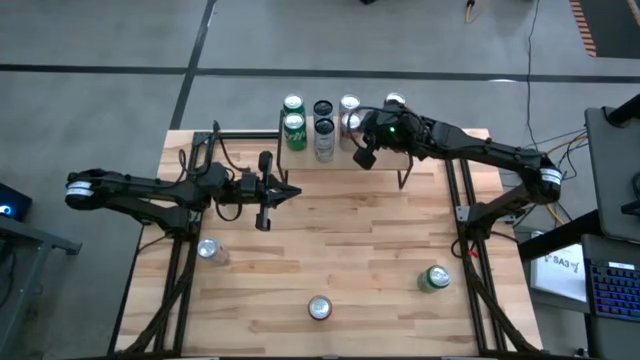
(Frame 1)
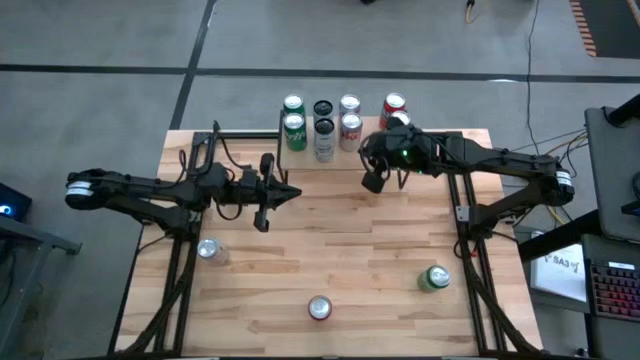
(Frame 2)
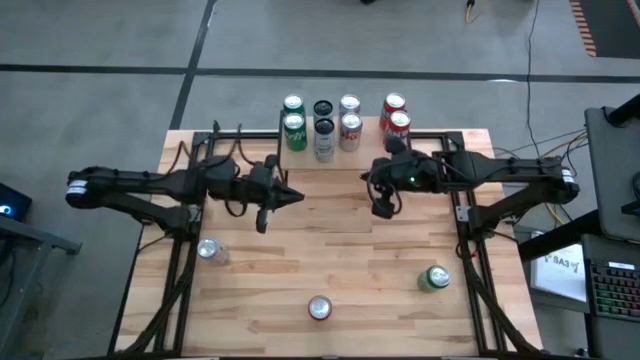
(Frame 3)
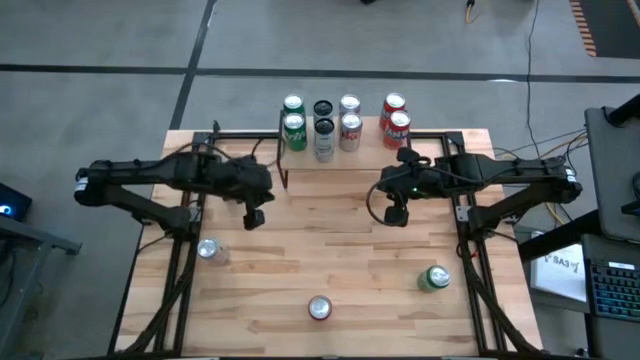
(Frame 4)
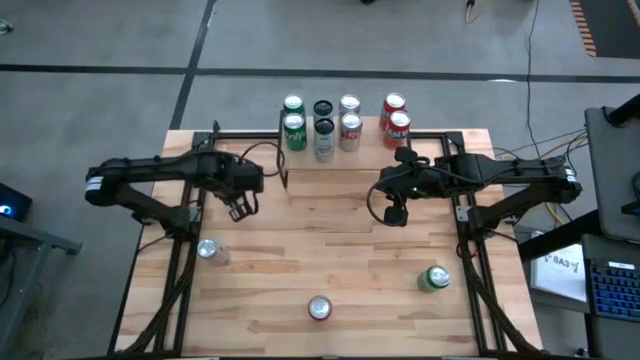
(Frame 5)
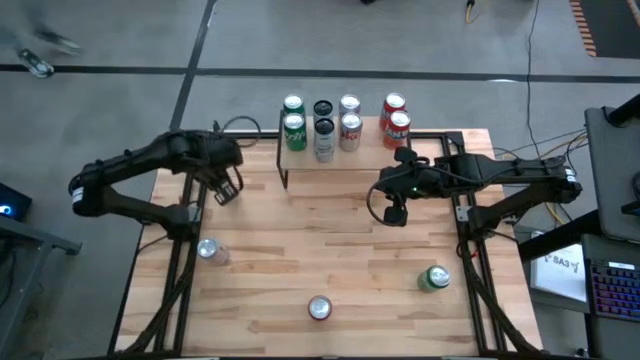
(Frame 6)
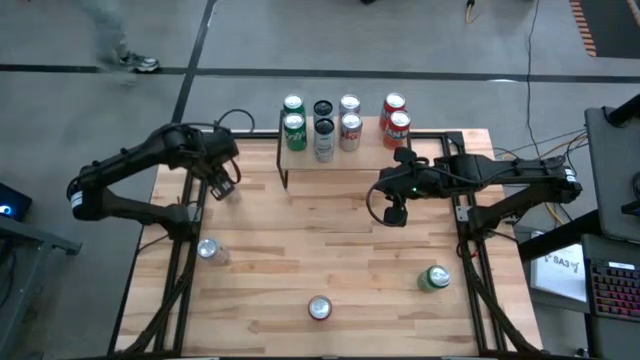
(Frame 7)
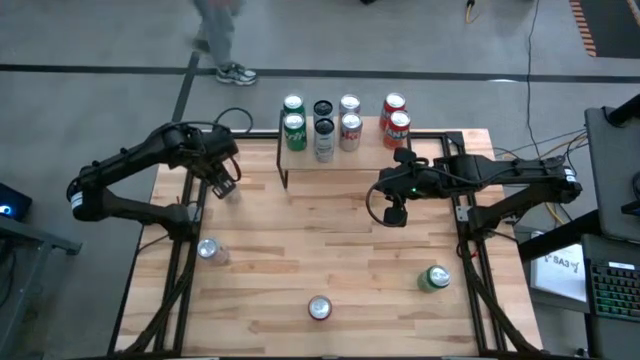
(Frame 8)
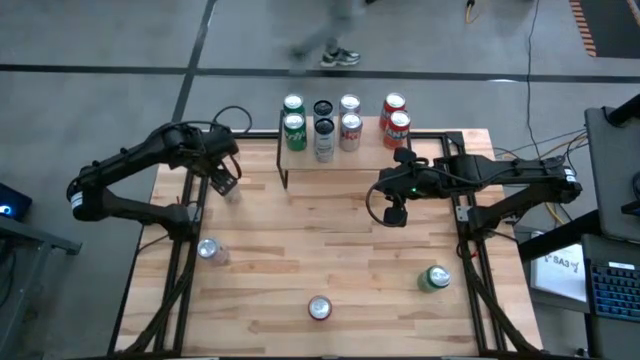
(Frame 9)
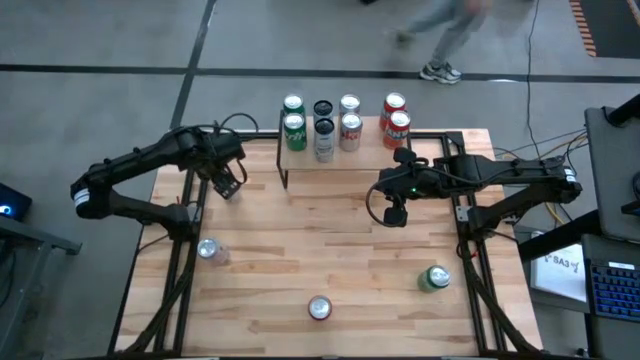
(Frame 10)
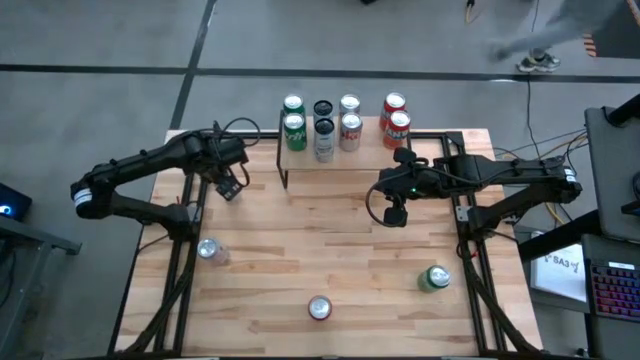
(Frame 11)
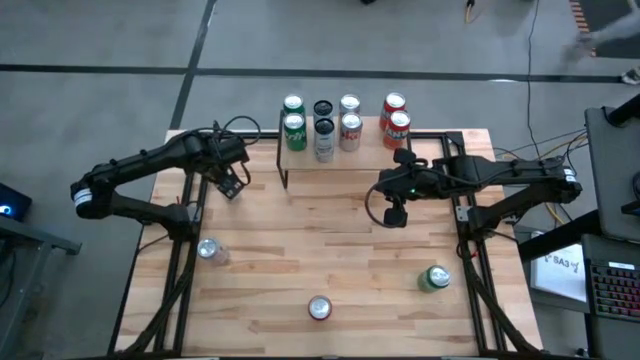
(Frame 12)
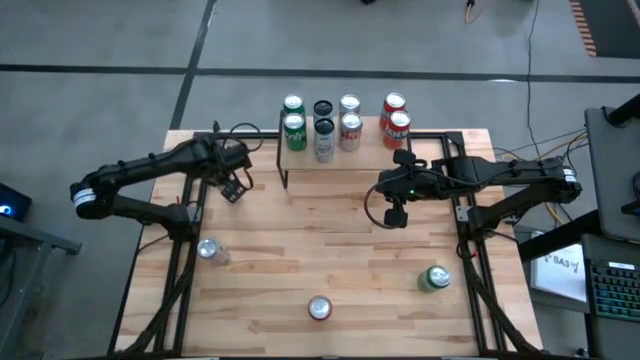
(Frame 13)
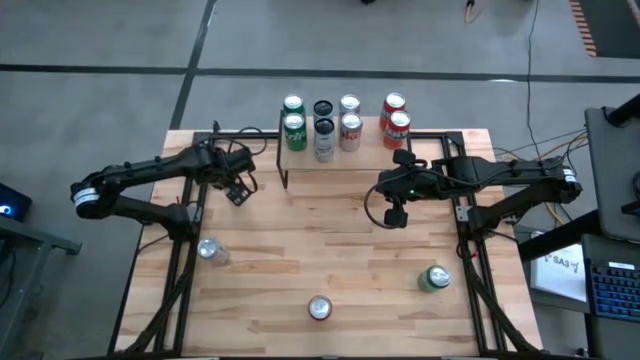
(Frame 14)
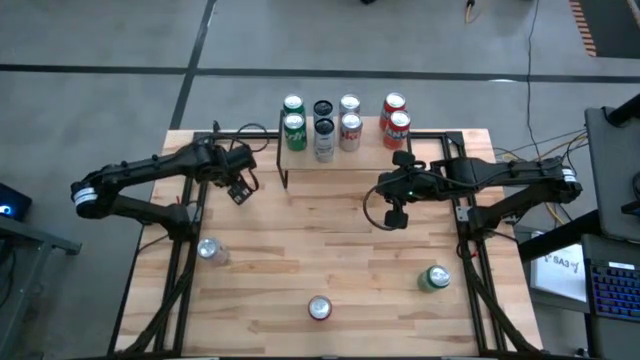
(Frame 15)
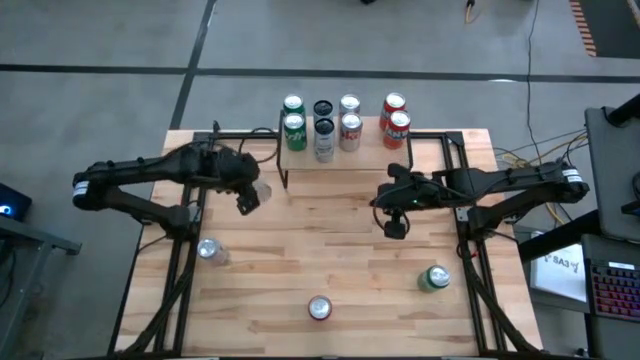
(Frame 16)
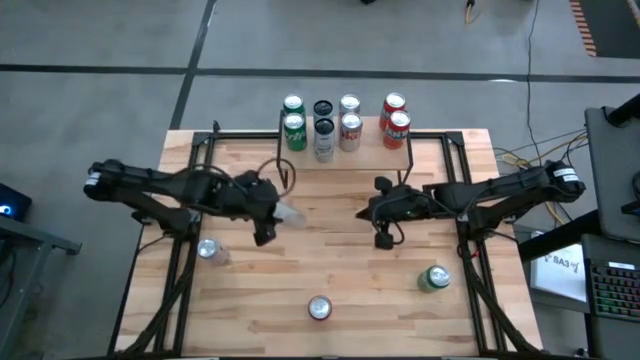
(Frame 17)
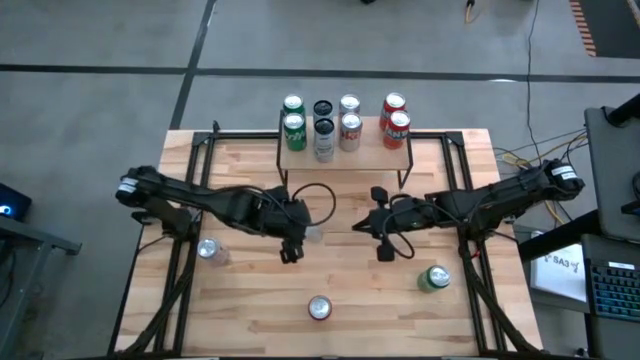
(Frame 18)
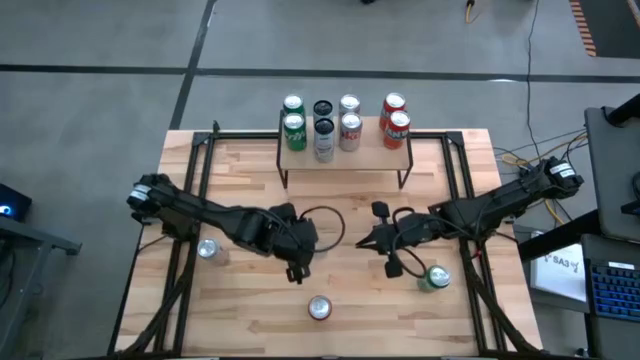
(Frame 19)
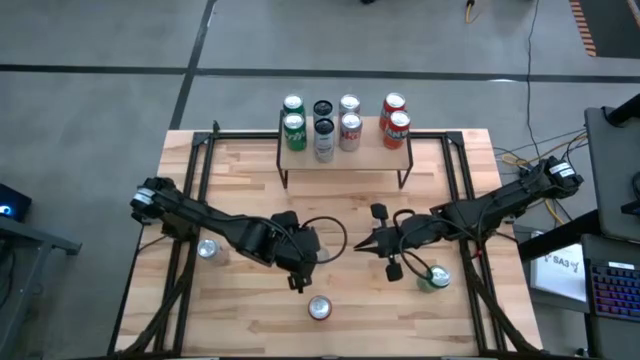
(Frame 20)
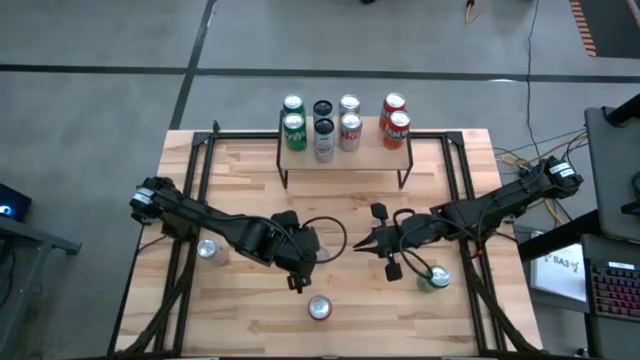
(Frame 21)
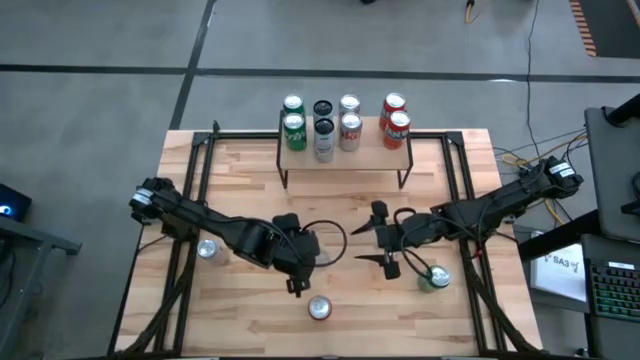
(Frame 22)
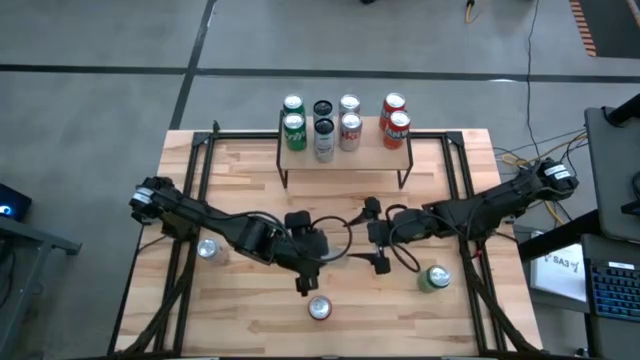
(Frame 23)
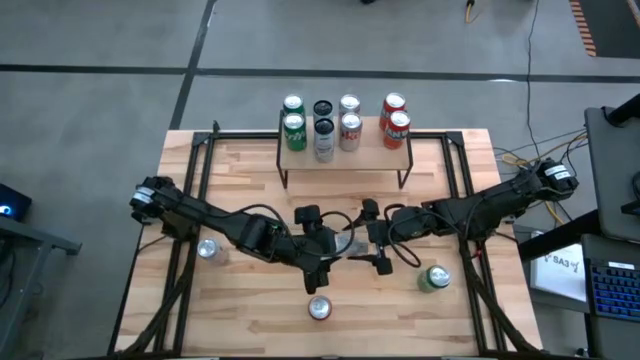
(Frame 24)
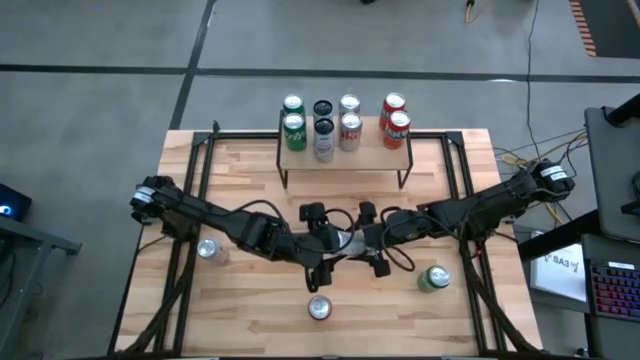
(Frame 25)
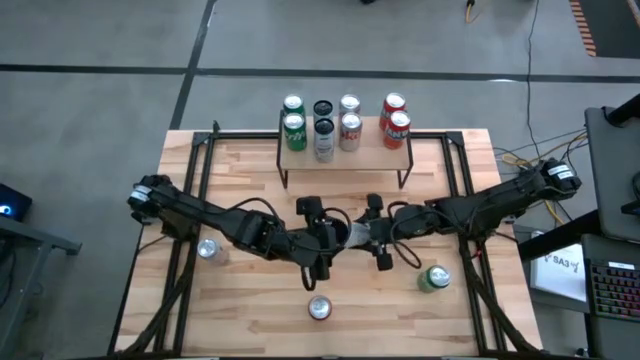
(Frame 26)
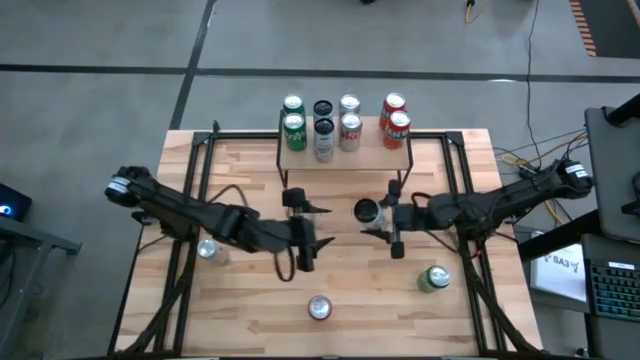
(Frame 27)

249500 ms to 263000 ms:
Task: Place canned beverage on shelf
Put the white yellow soda can on the shelf
